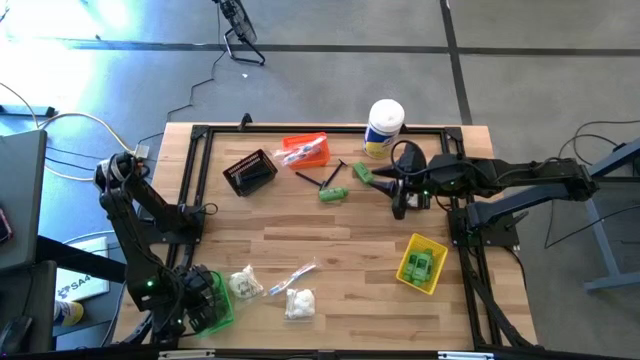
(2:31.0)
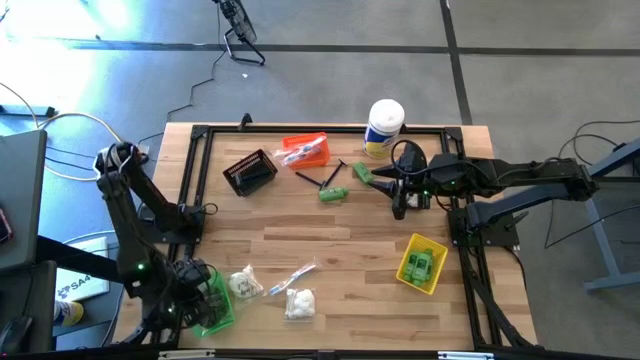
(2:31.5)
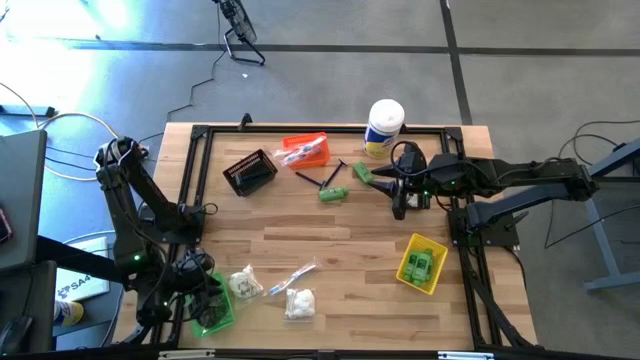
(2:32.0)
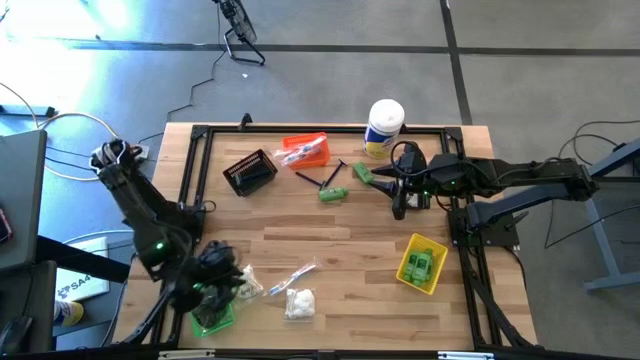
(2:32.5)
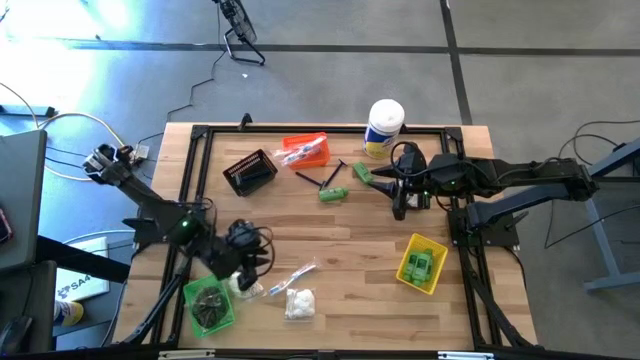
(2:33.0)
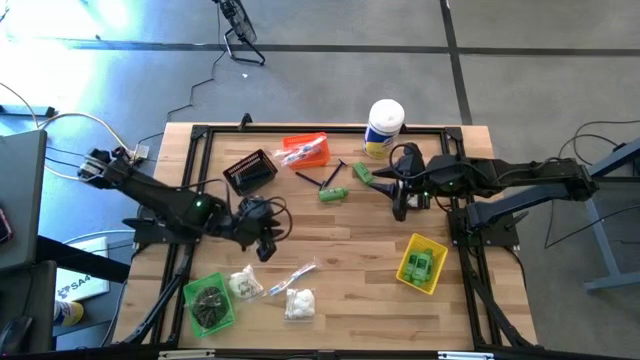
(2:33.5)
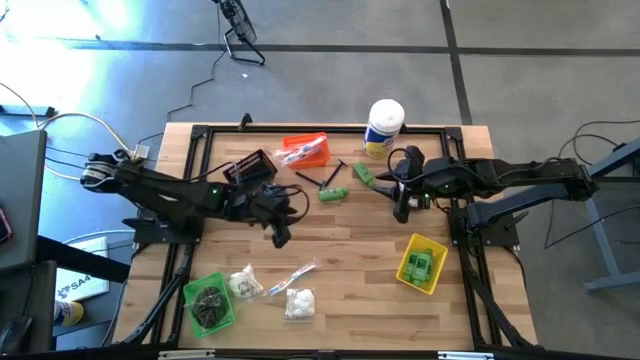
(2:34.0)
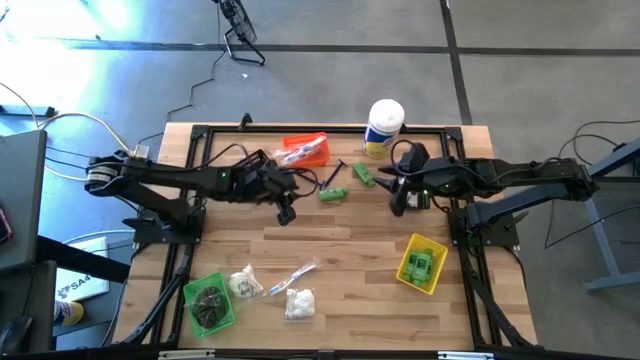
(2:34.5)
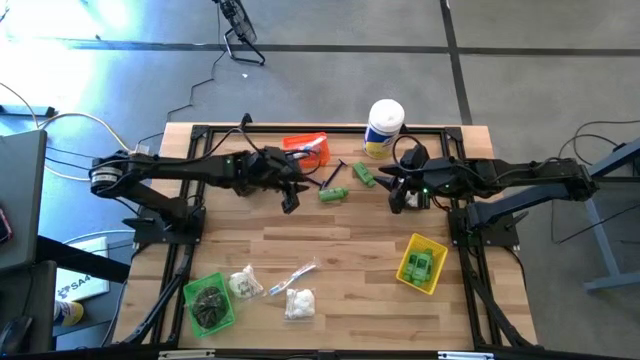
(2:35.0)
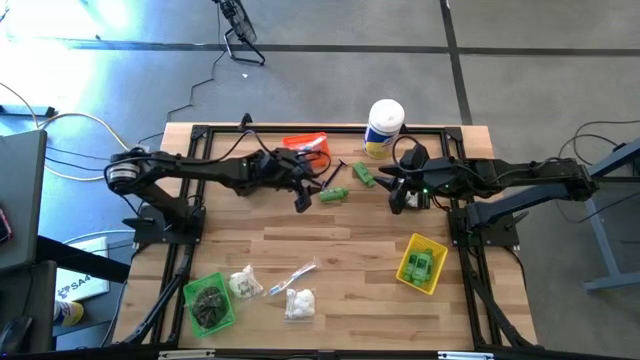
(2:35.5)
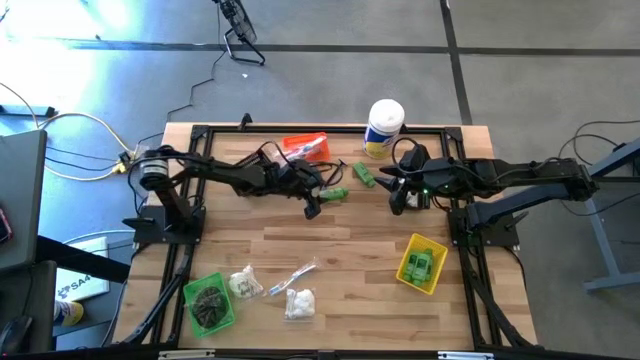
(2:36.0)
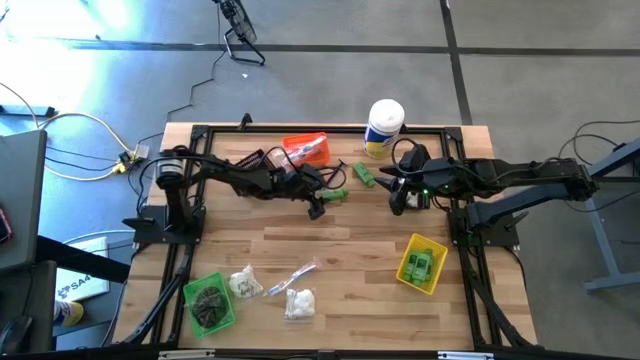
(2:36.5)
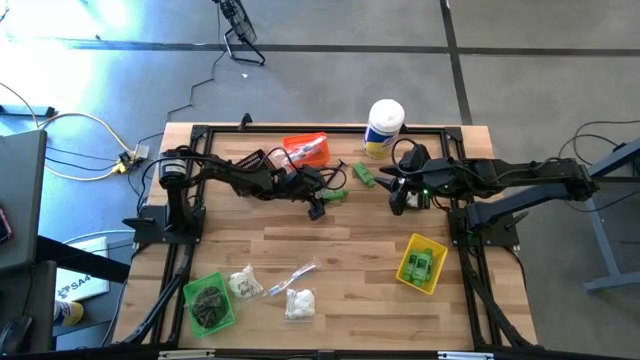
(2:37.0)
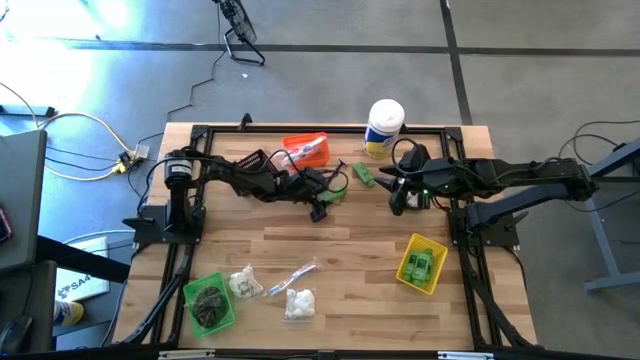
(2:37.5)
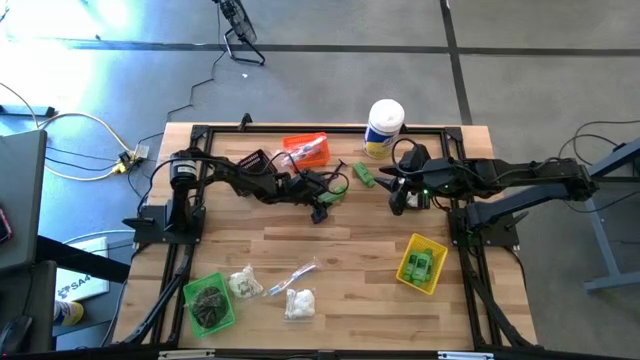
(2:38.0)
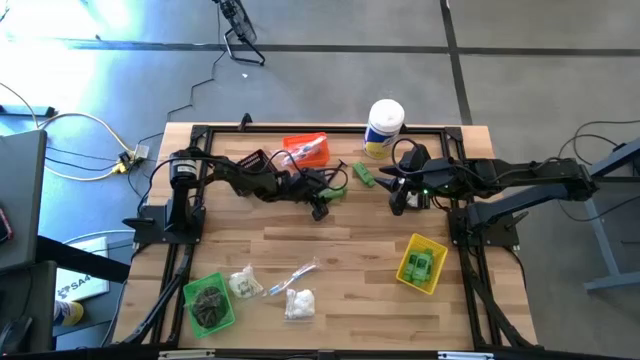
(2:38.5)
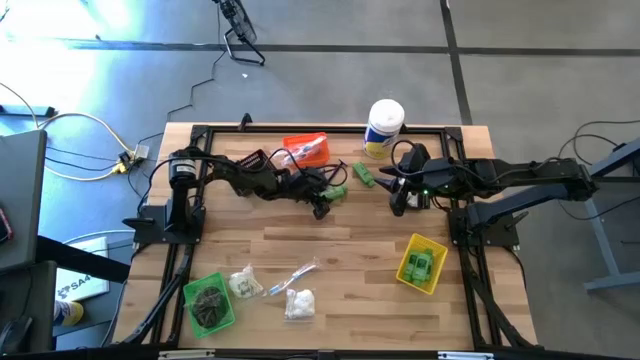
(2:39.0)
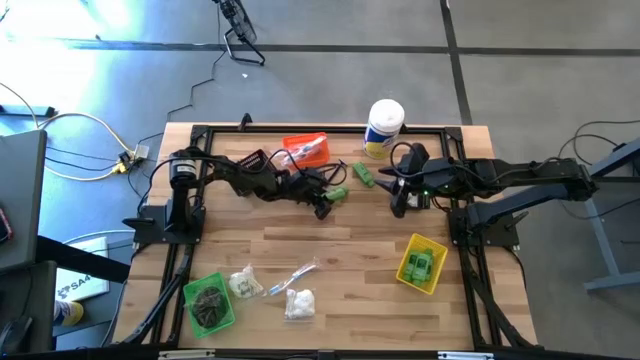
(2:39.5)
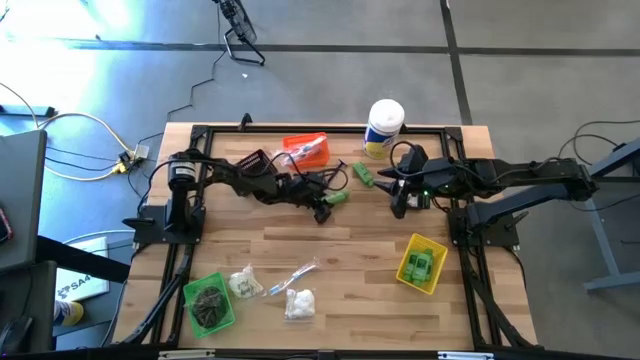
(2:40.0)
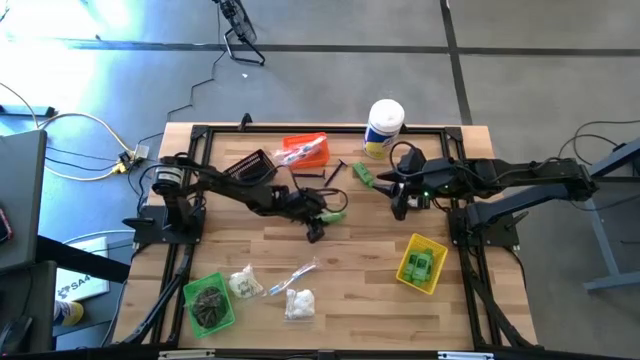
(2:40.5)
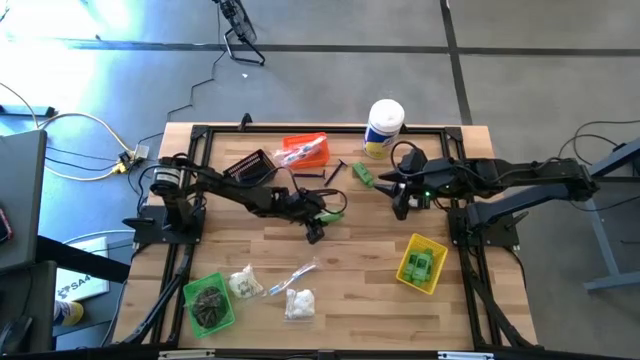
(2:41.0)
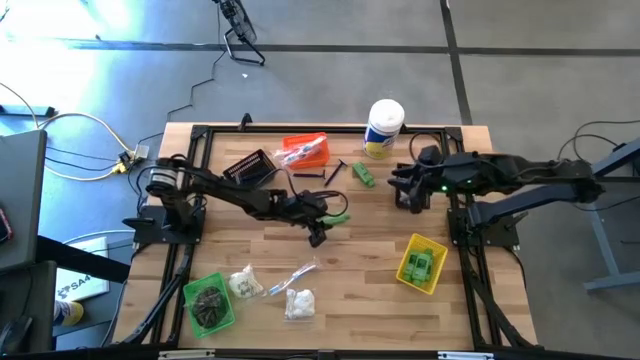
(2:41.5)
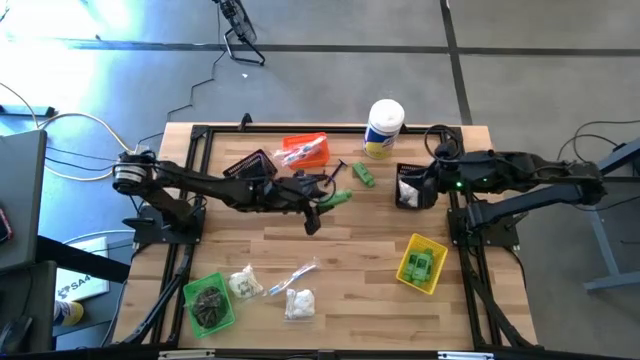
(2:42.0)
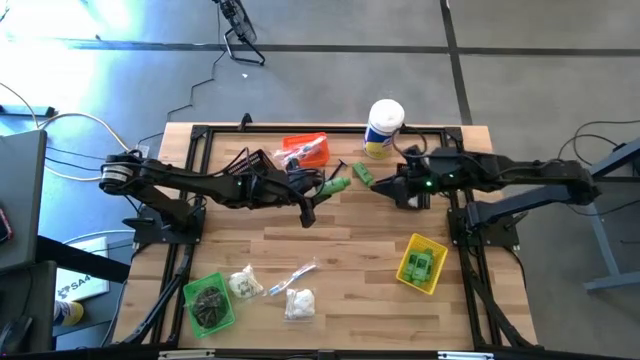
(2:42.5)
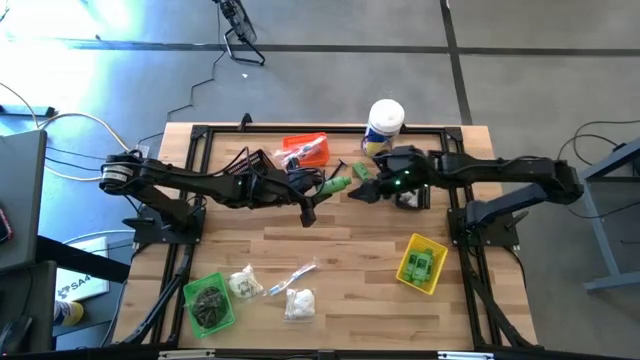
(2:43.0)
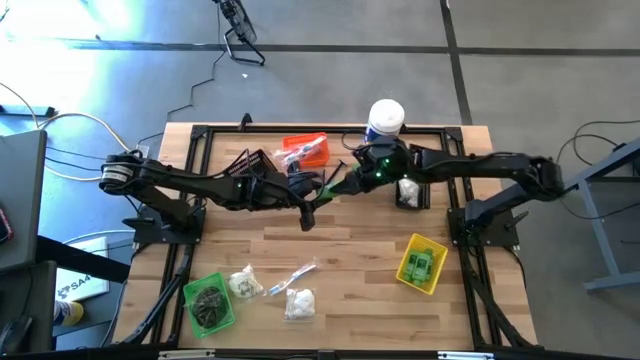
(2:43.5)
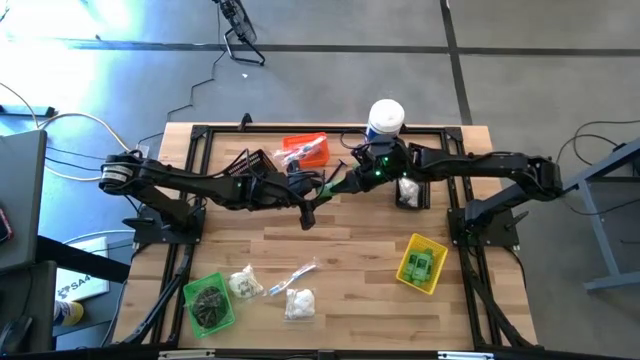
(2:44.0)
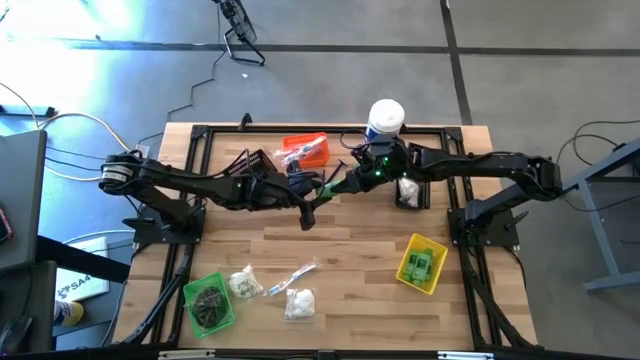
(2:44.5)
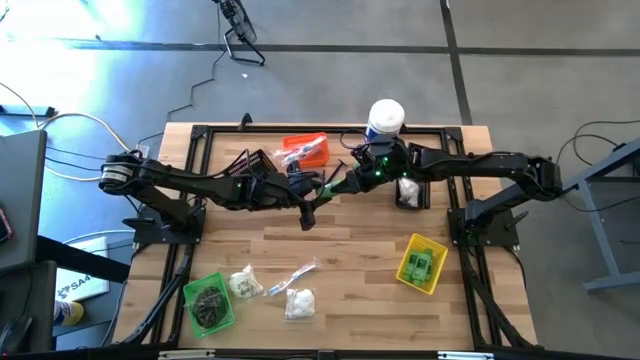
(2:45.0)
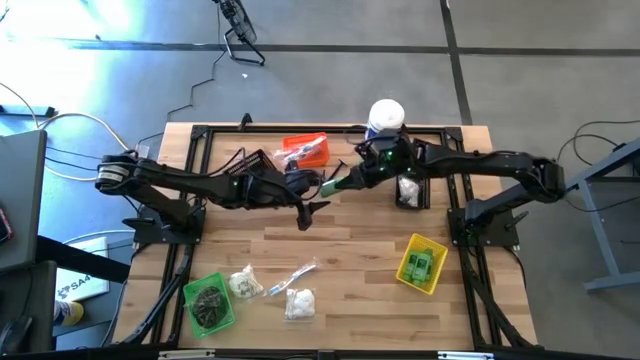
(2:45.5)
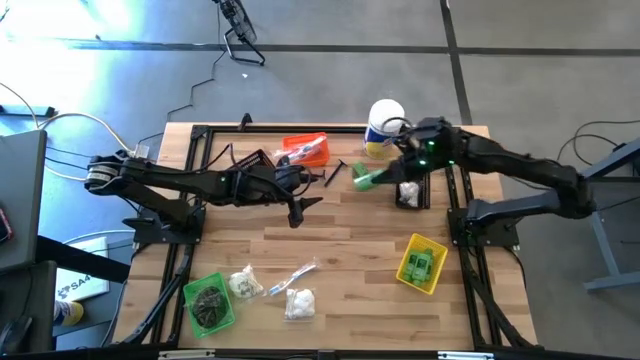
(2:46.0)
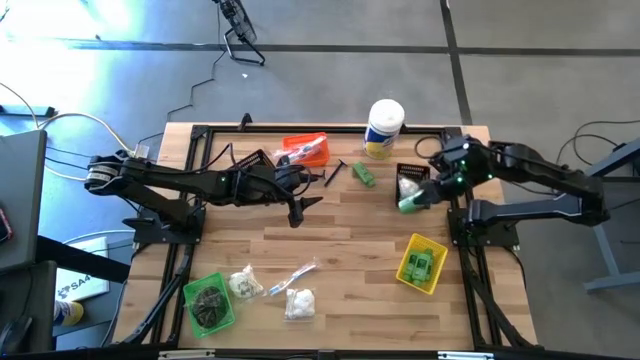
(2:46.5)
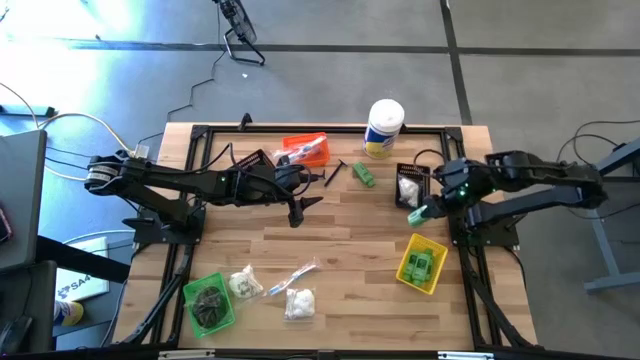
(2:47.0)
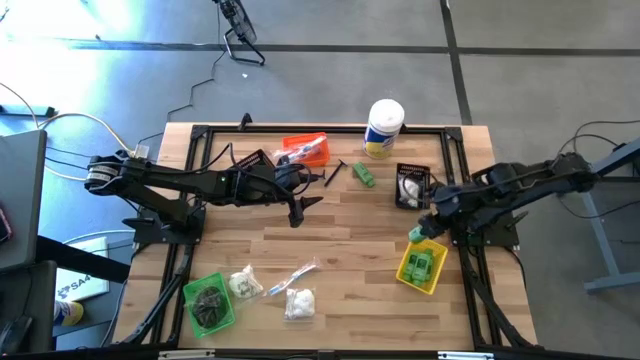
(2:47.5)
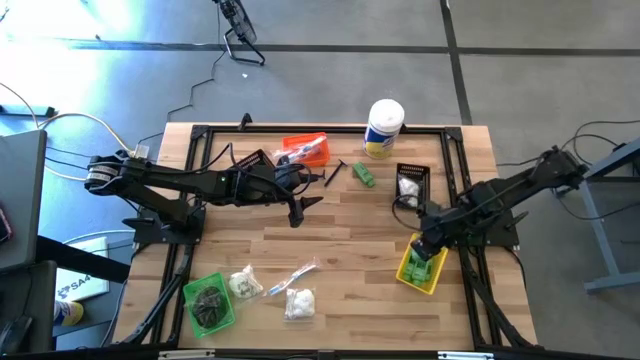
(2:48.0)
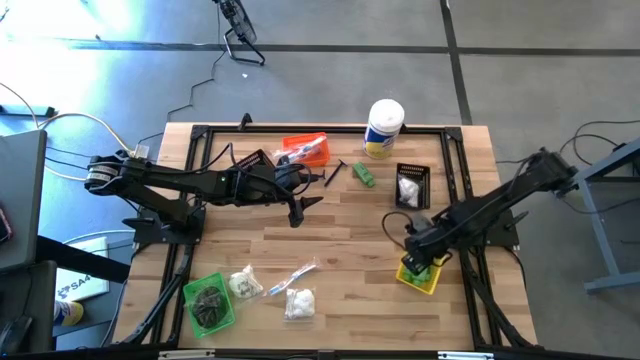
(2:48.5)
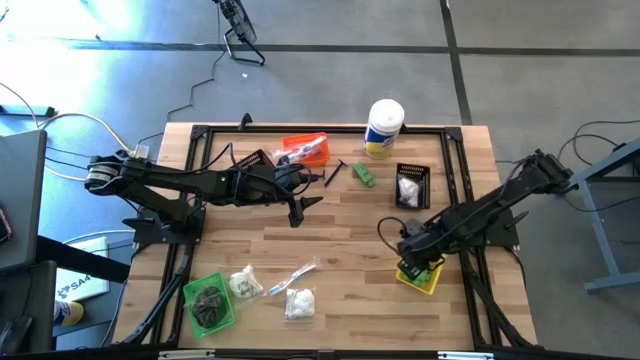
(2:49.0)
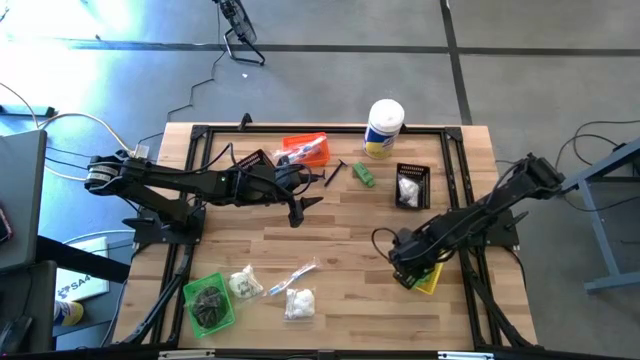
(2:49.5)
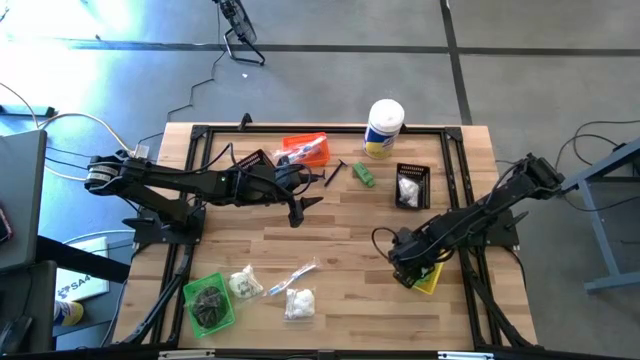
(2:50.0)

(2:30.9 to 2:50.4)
Task: Pick & Place Travel size toiletries
Put the green shampoo bottle into the yellow bin

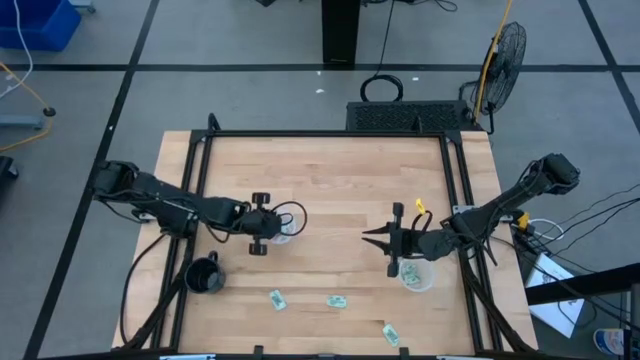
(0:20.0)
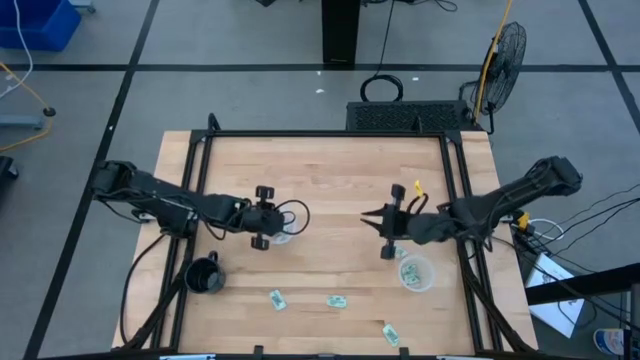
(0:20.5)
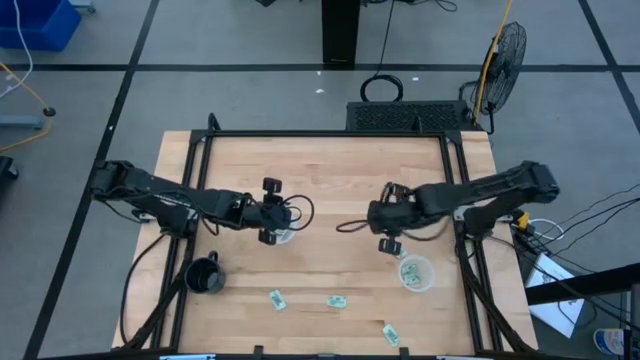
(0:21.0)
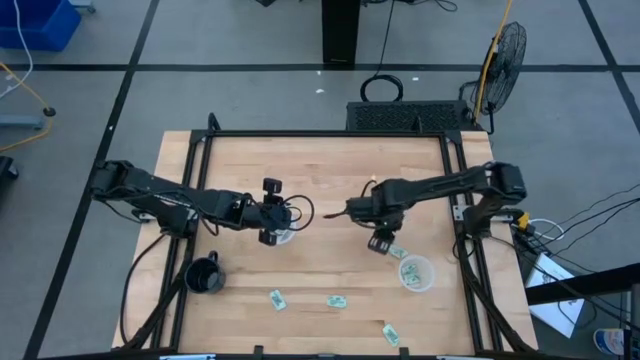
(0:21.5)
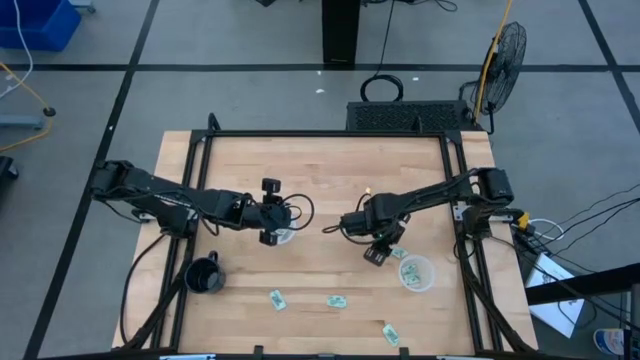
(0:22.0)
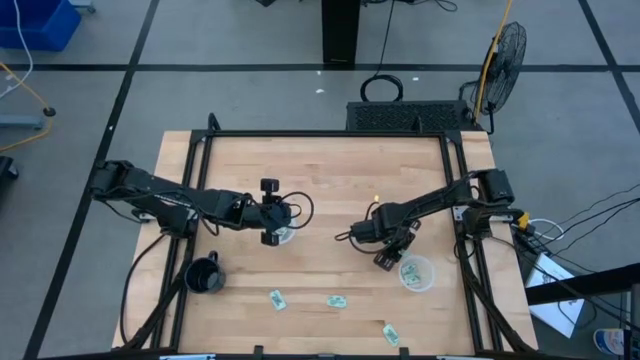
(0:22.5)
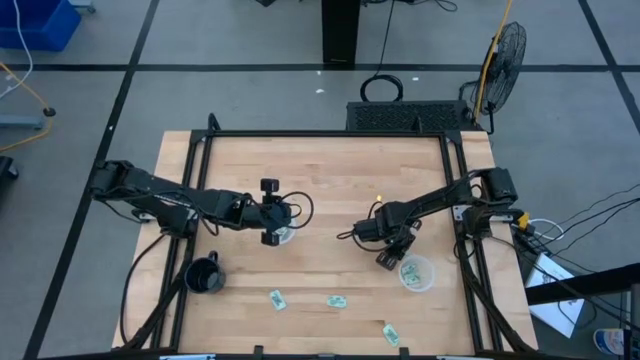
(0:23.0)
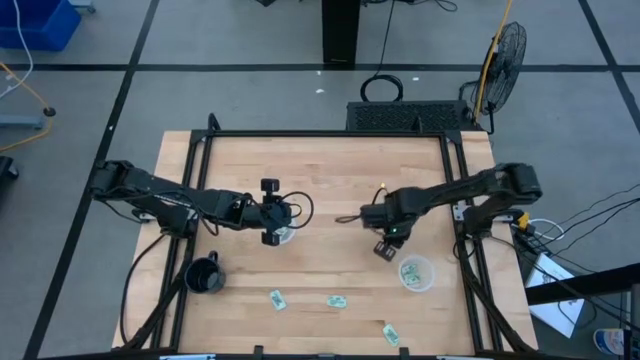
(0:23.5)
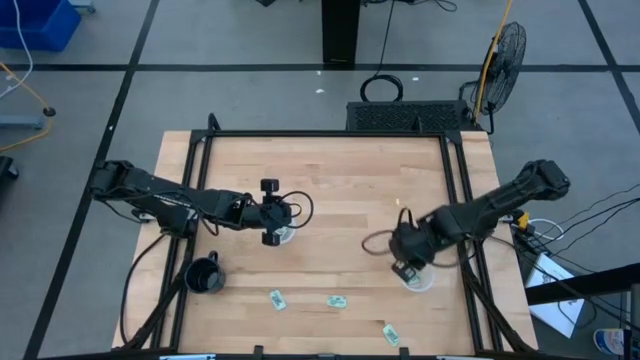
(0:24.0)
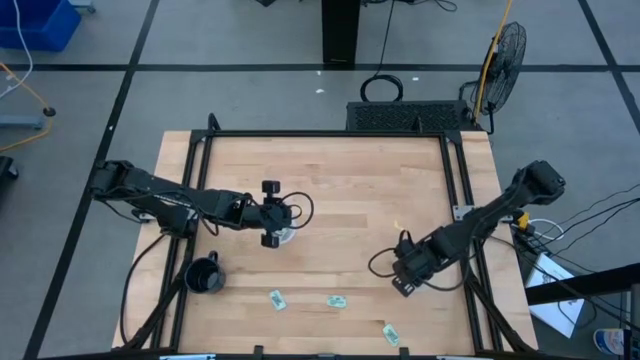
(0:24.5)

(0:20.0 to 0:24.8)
Task: Pick and place Stevia / Truvia into bins
Put the green stevia packet into the right transparent container
